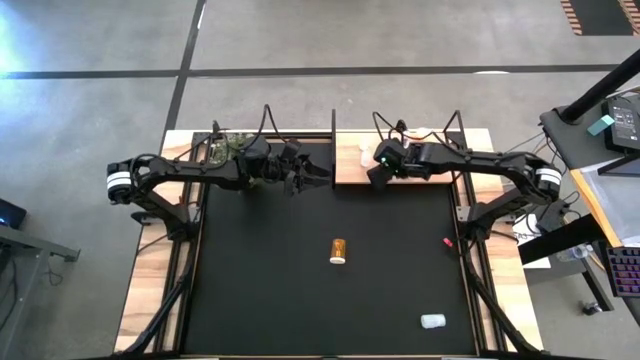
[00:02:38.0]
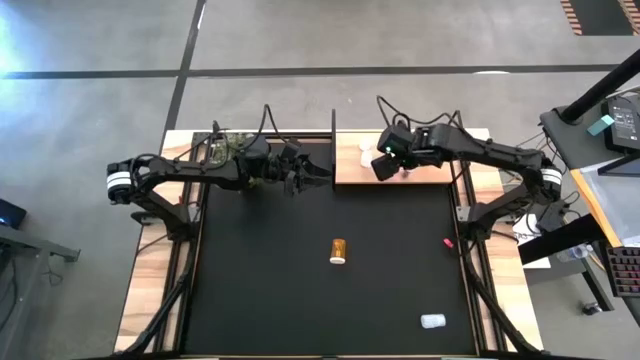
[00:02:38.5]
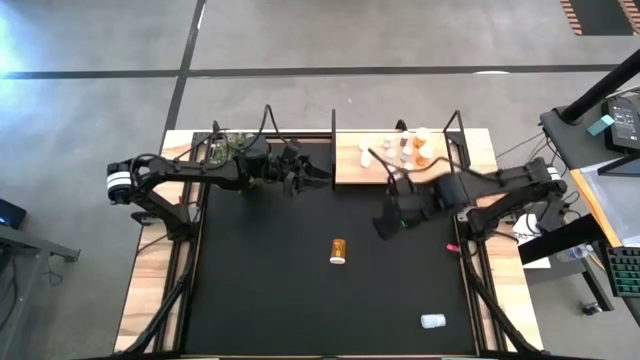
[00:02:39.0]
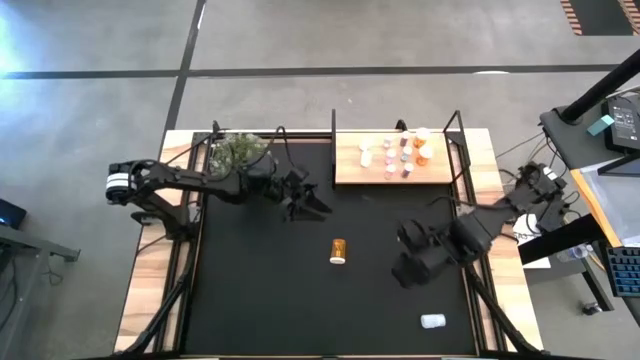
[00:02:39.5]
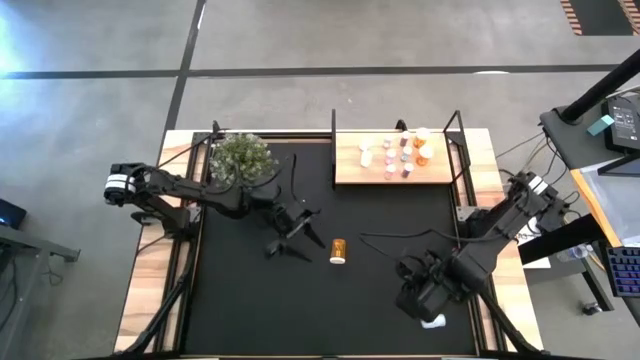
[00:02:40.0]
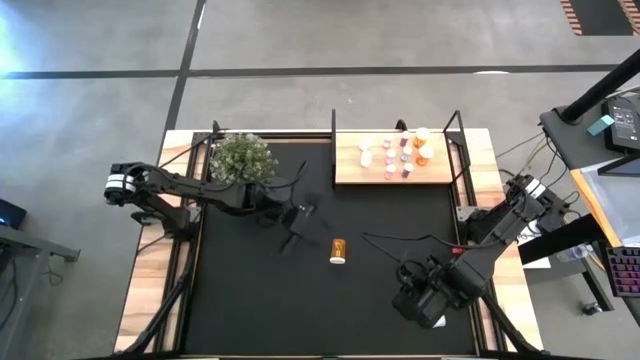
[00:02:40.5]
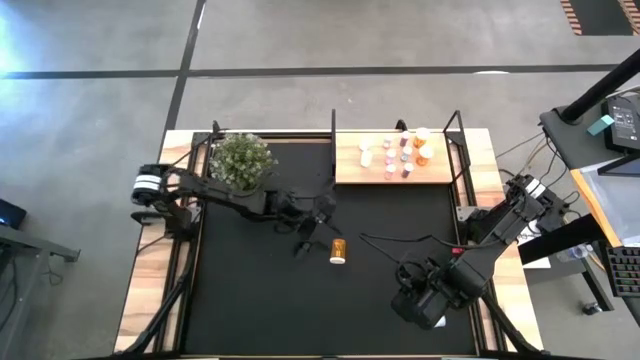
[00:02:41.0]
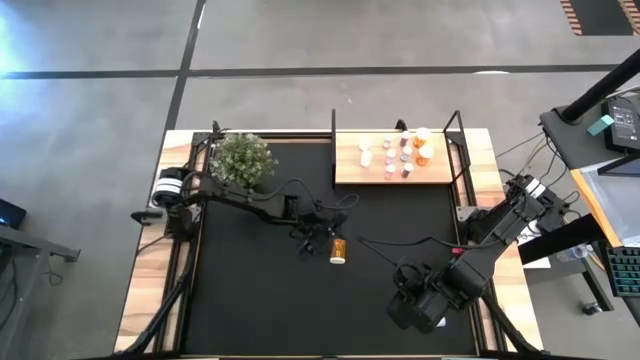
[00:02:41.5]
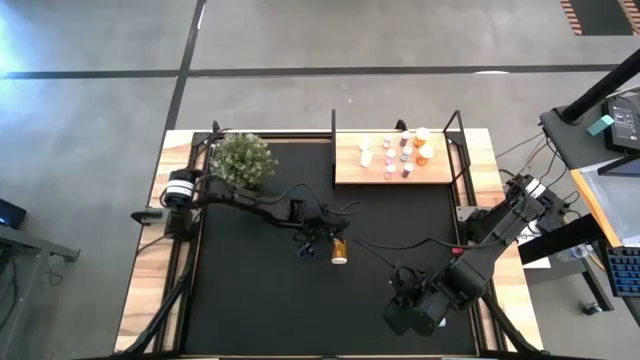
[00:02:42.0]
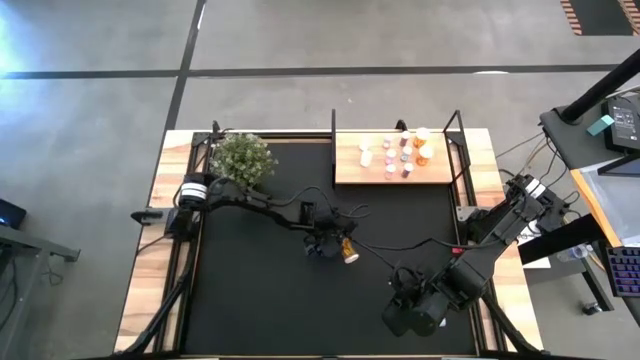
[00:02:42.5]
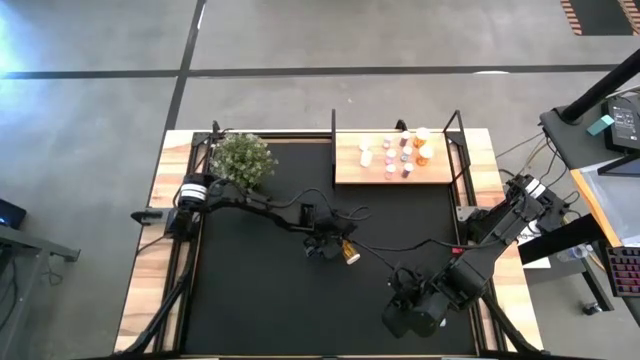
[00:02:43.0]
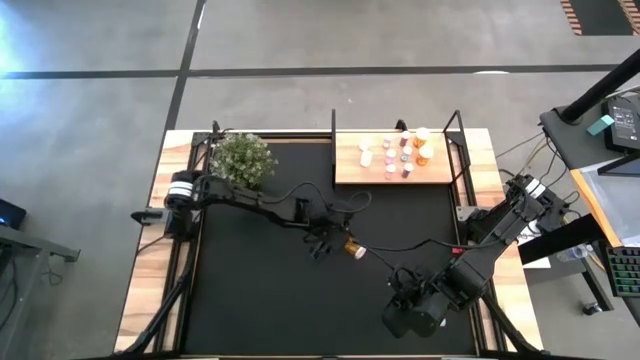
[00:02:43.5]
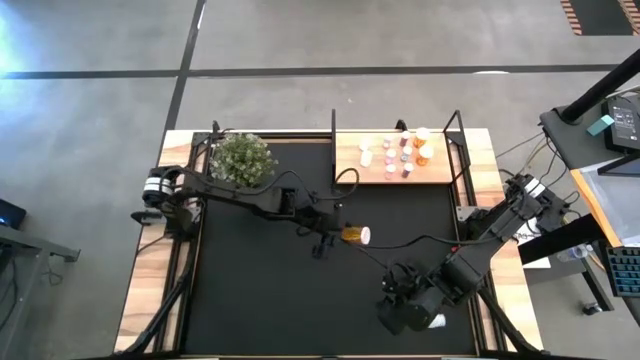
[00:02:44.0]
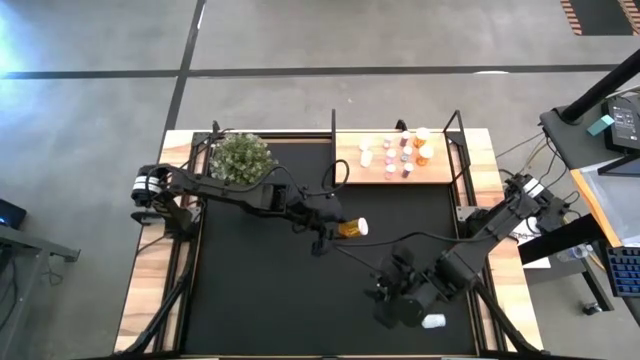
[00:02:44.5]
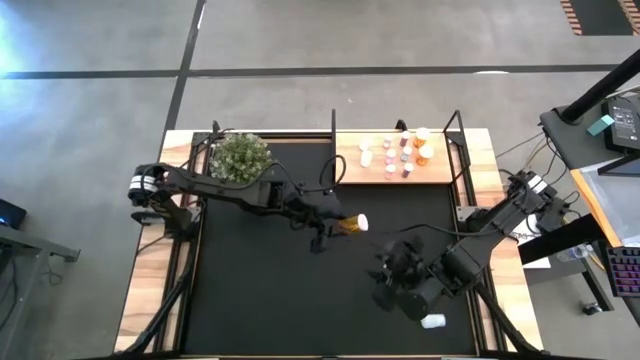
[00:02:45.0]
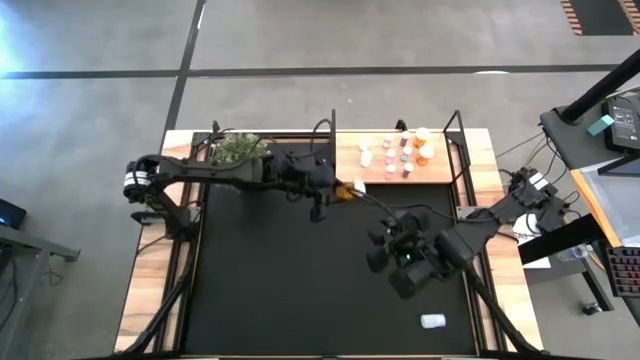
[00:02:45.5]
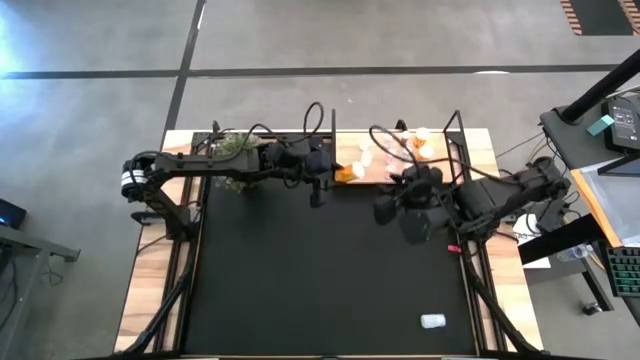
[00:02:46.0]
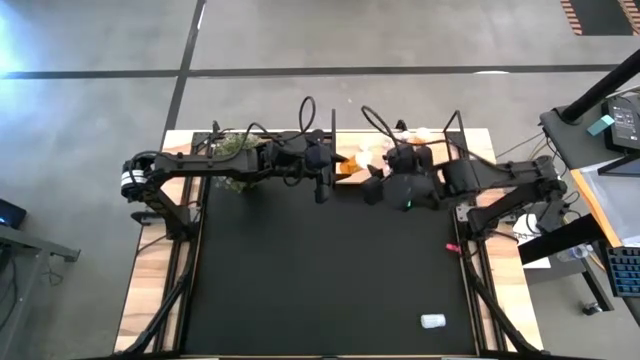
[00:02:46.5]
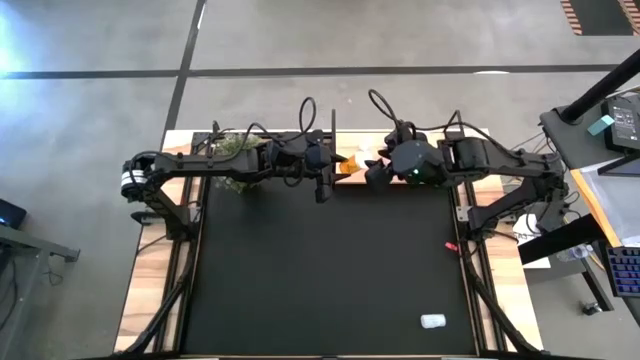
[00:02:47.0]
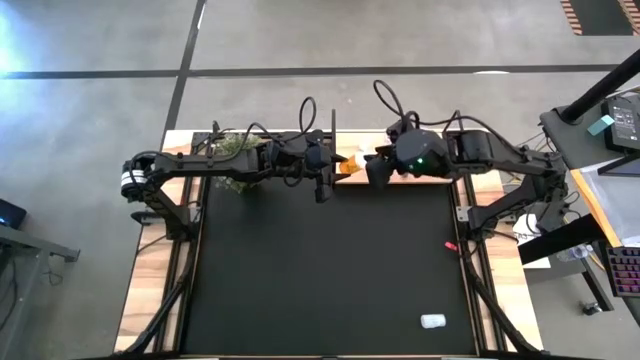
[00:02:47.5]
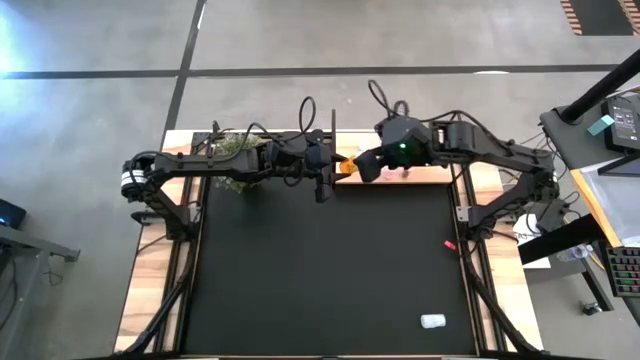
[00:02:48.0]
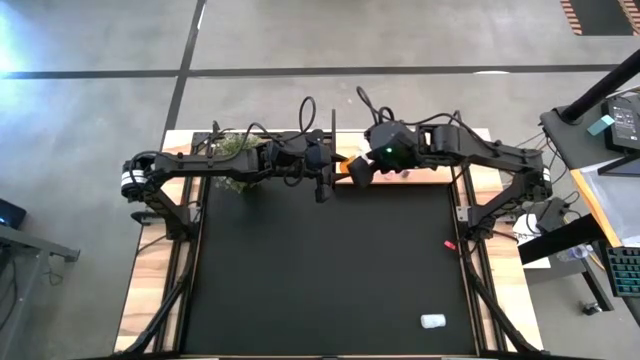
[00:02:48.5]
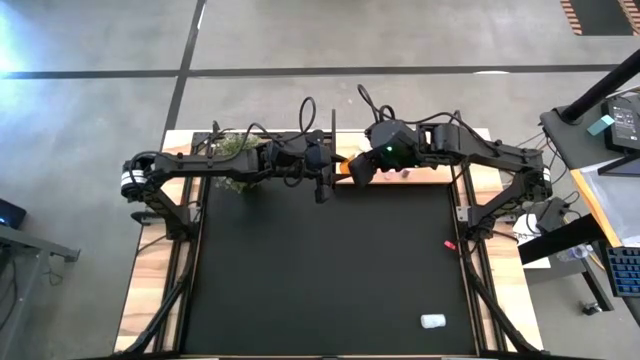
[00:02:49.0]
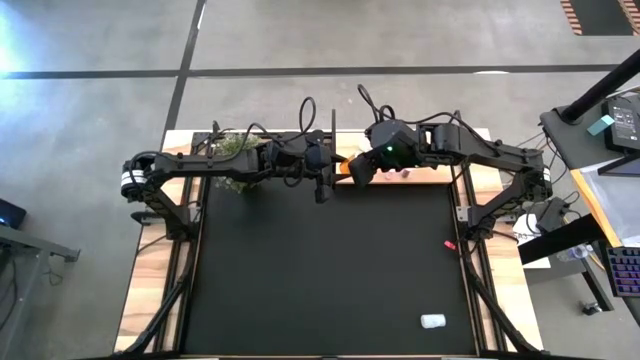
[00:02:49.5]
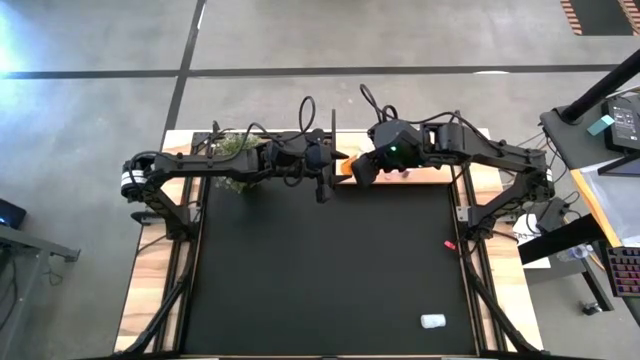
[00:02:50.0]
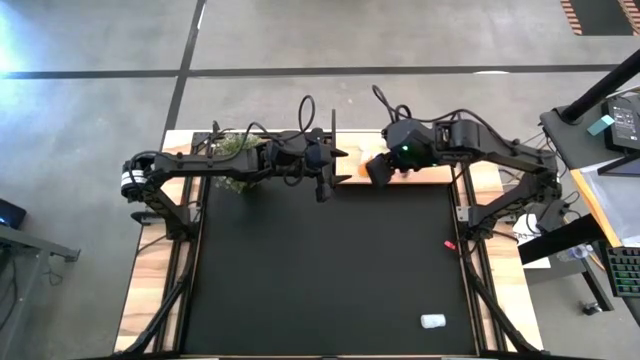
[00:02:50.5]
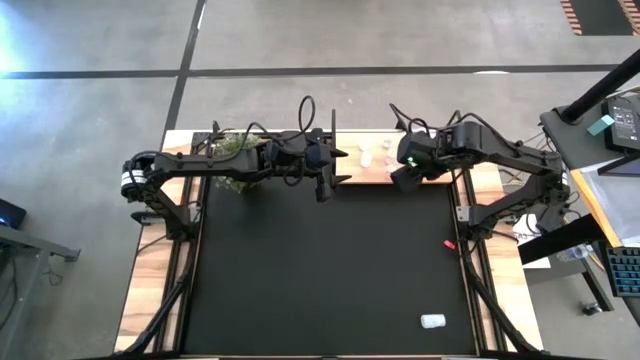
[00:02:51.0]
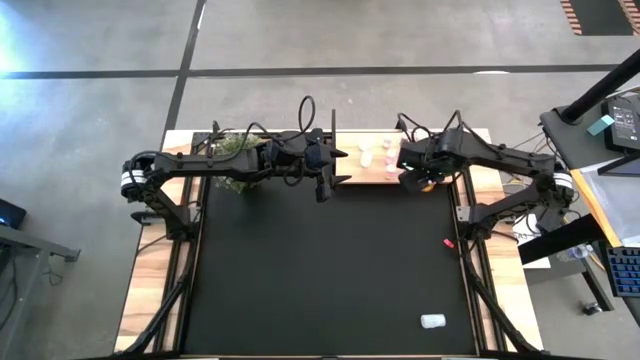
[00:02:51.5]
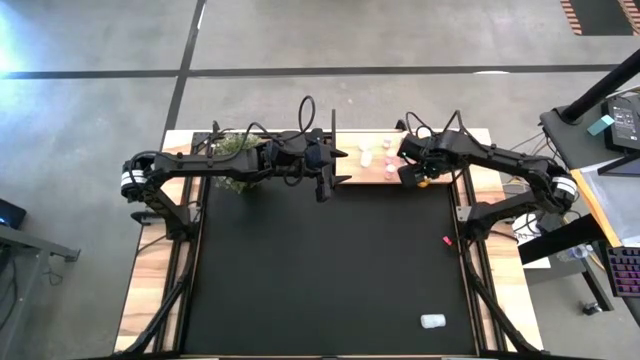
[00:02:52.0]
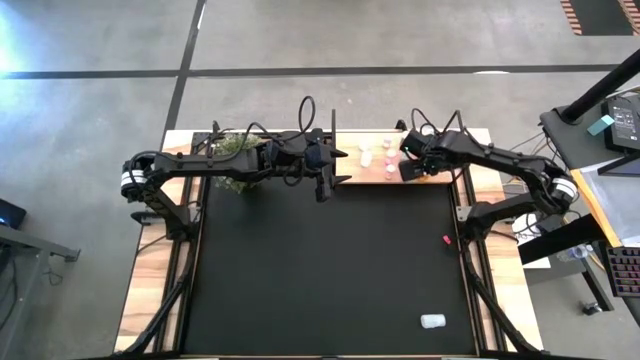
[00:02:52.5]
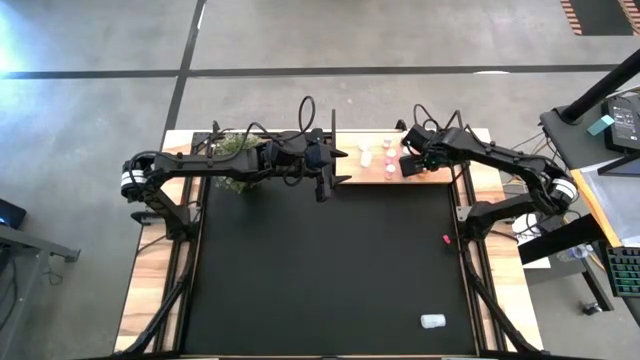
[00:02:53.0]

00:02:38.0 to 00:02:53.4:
Task: Pick and place medicine bottles onto shelf by color
Put the orange pill bottle on the shelf aligned with the other orange pill bottles

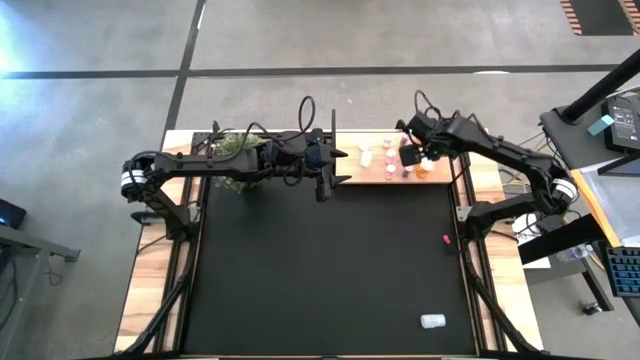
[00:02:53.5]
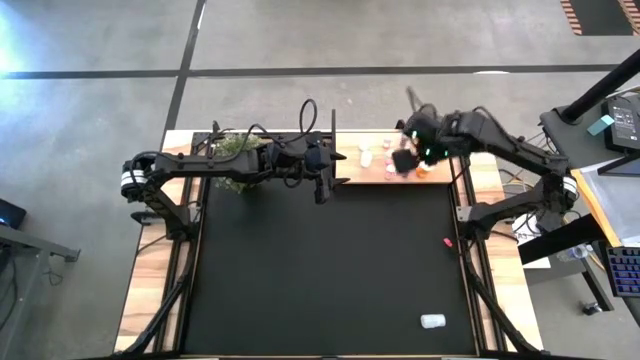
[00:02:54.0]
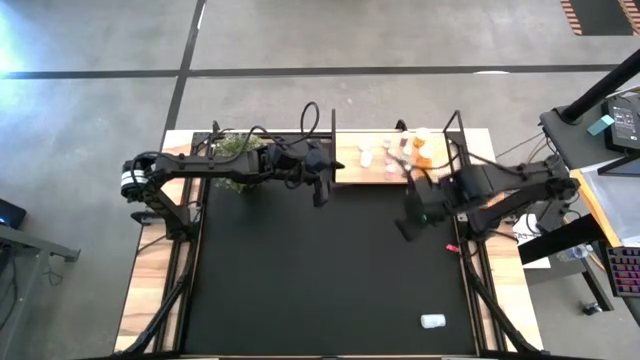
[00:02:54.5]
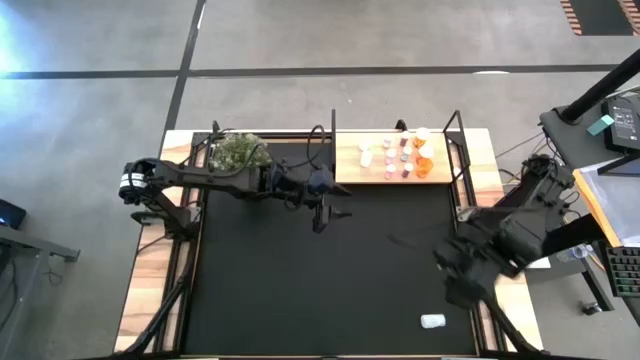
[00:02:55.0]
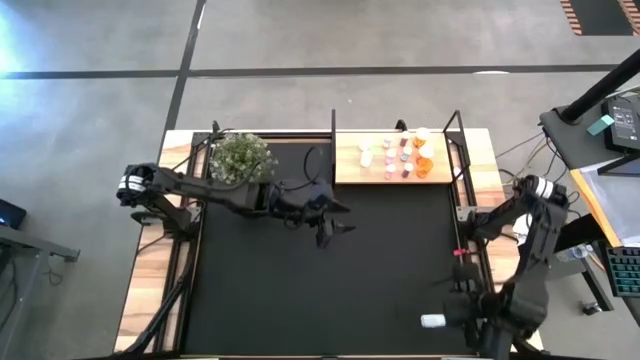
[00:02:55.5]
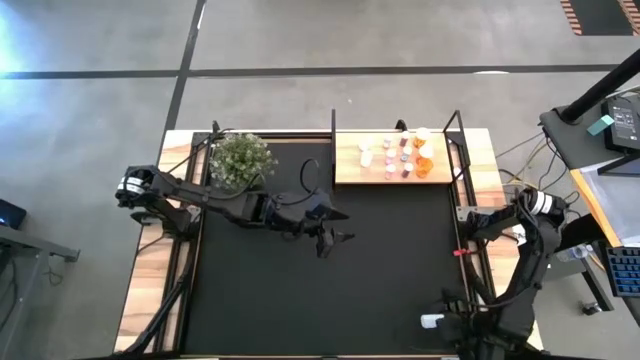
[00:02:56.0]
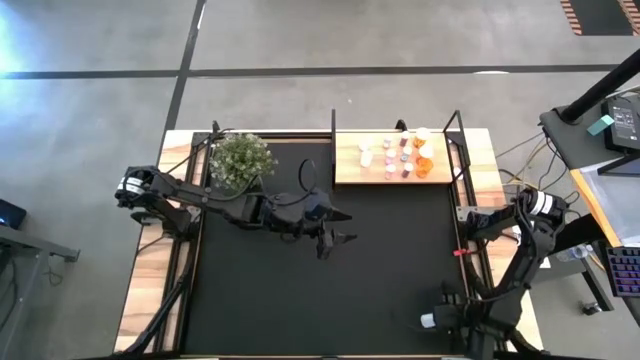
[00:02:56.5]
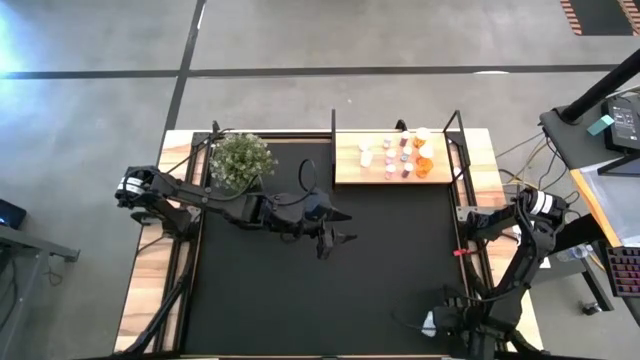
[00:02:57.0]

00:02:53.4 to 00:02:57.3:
Put the white pill bottle on the shelf aligned with the other white pill bottles

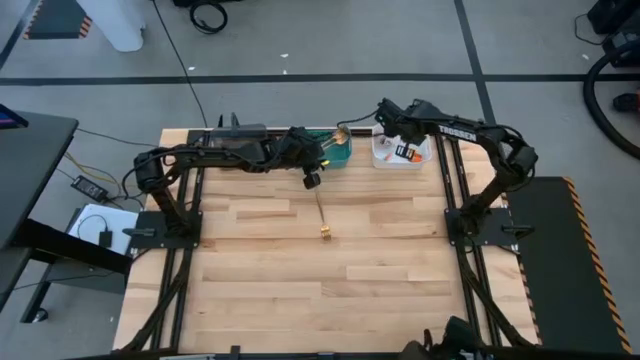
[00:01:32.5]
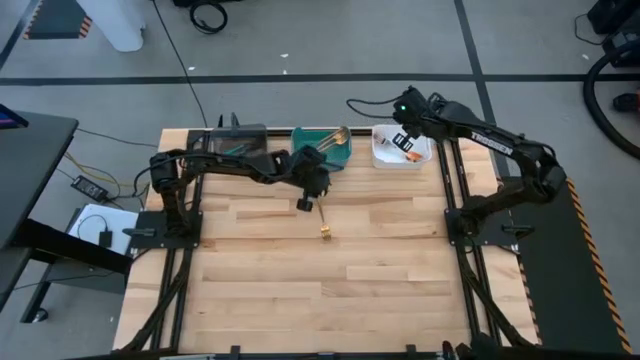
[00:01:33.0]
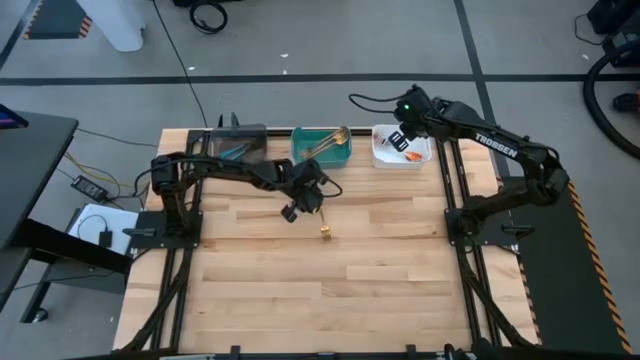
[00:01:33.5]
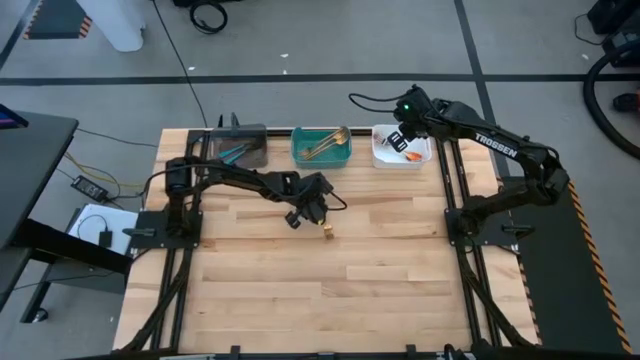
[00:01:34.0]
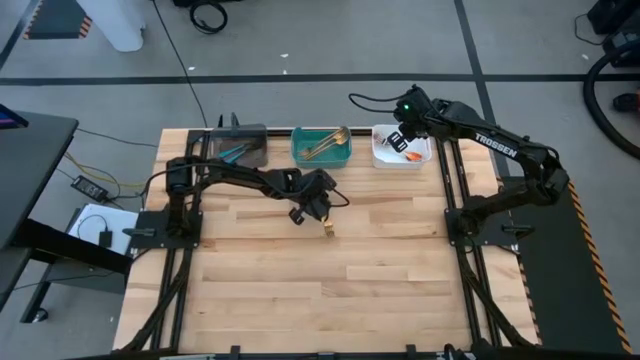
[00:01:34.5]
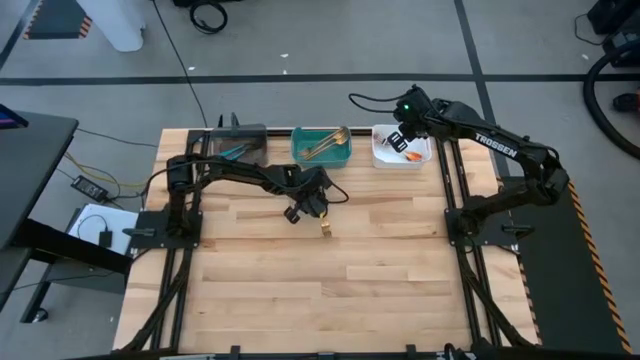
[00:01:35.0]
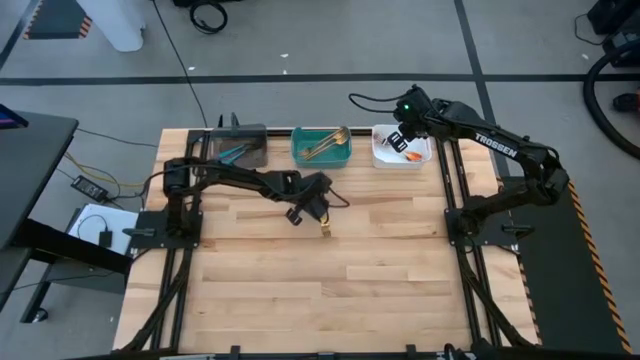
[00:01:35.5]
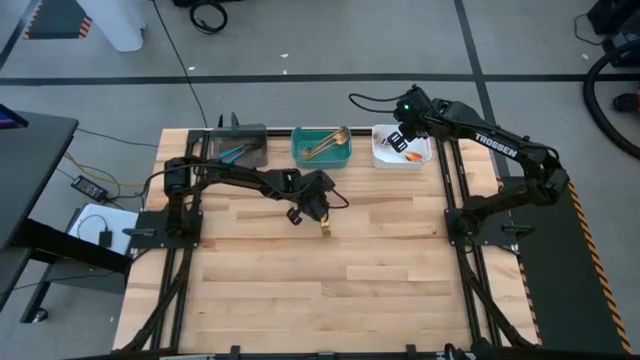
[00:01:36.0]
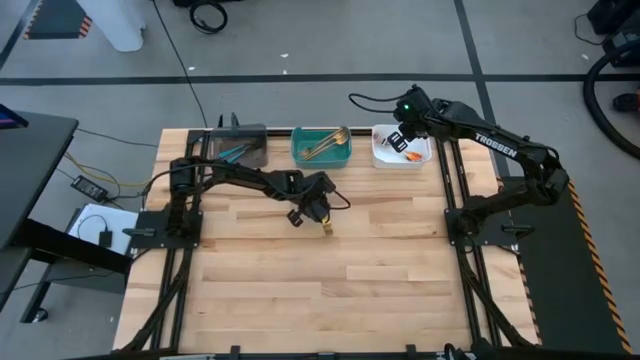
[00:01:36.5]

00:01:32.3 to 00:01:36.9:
Task: Sort silverware by color (type)
Put the gold fork into the green bin
